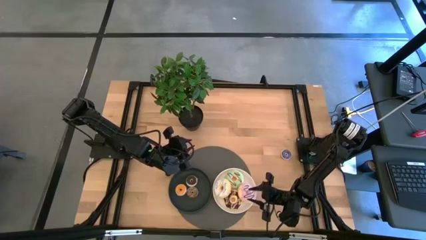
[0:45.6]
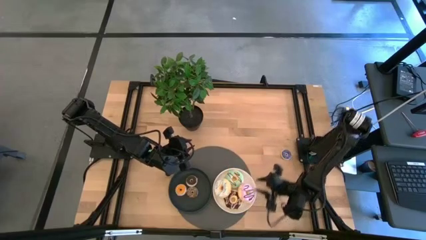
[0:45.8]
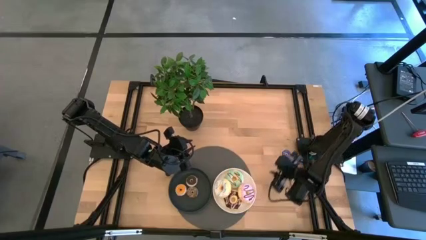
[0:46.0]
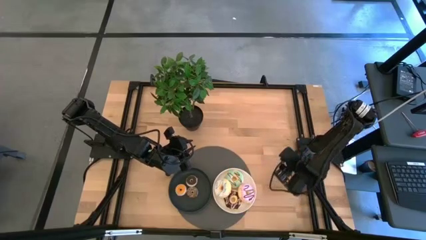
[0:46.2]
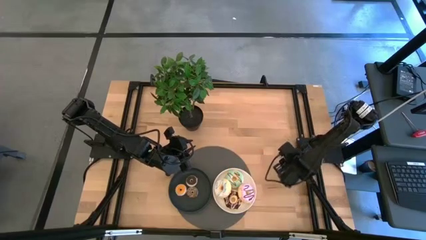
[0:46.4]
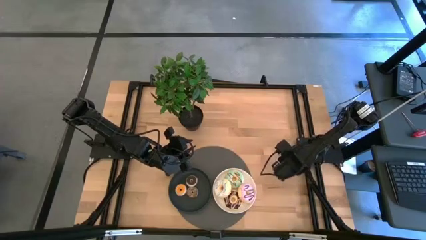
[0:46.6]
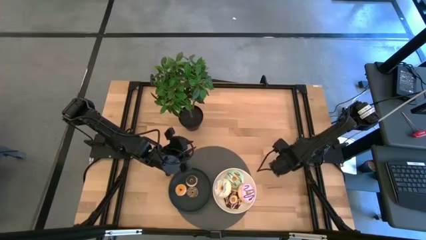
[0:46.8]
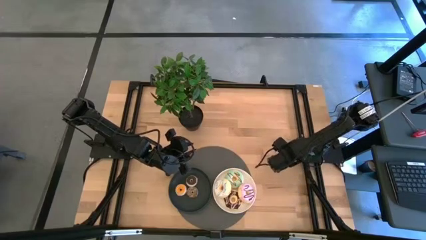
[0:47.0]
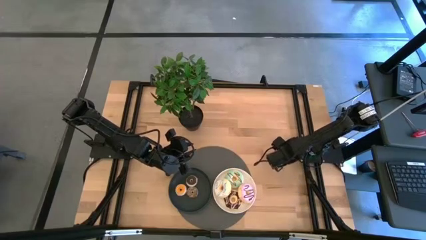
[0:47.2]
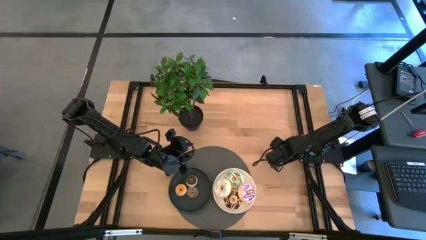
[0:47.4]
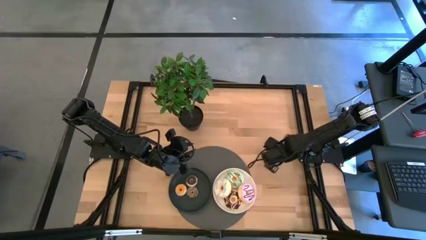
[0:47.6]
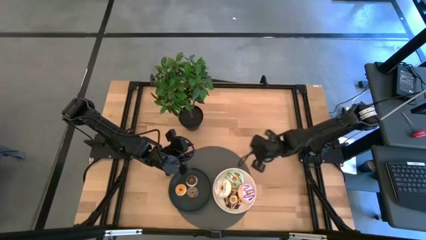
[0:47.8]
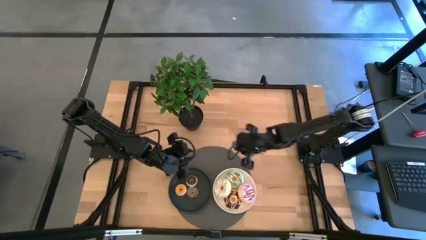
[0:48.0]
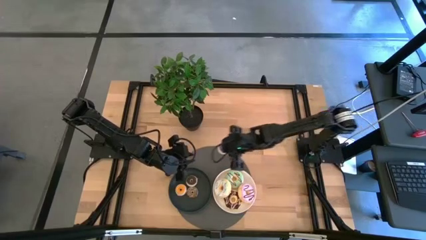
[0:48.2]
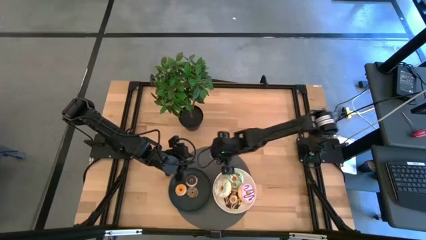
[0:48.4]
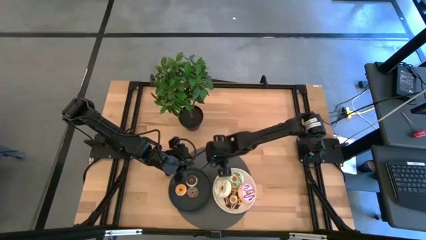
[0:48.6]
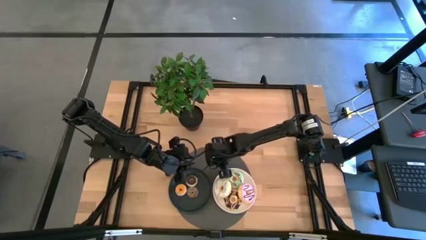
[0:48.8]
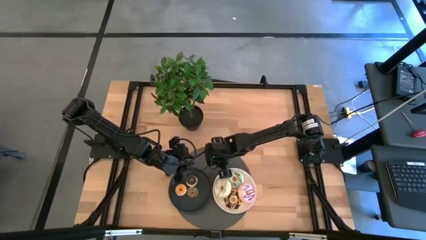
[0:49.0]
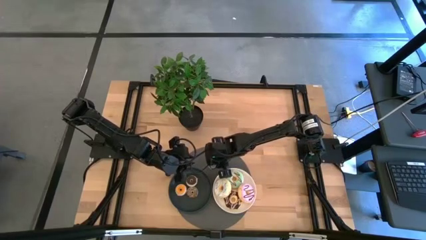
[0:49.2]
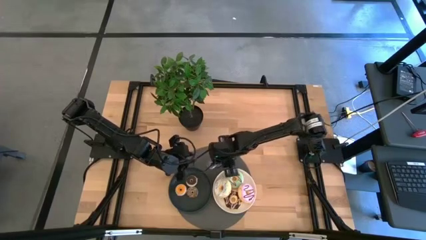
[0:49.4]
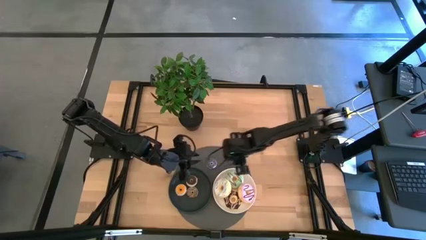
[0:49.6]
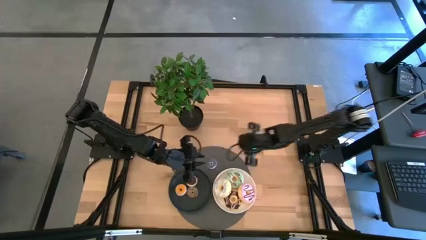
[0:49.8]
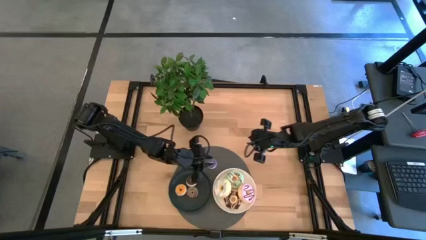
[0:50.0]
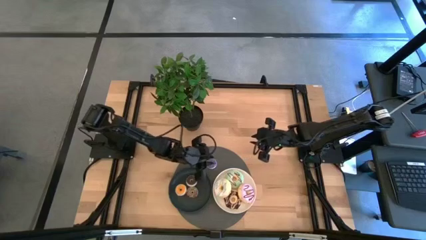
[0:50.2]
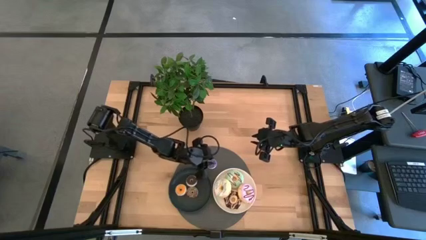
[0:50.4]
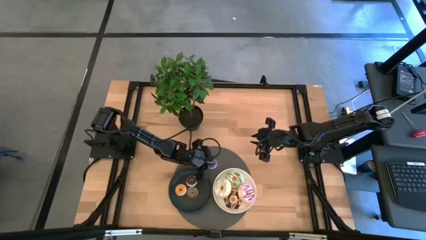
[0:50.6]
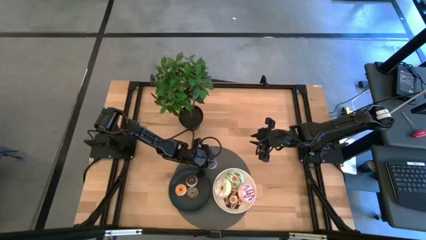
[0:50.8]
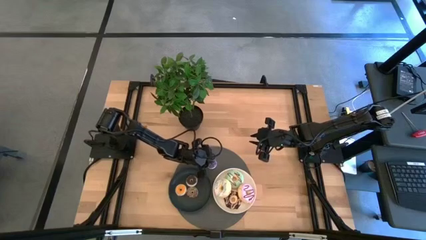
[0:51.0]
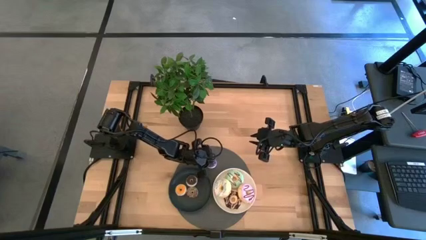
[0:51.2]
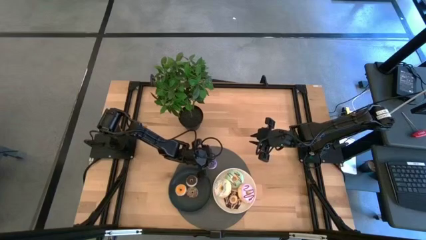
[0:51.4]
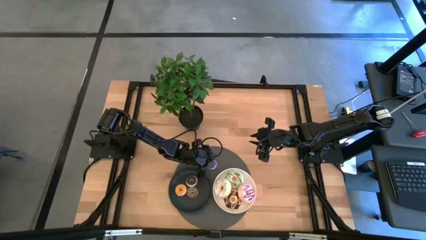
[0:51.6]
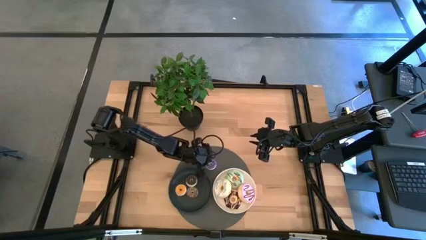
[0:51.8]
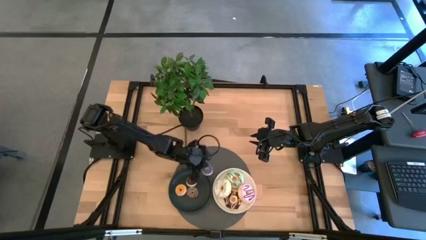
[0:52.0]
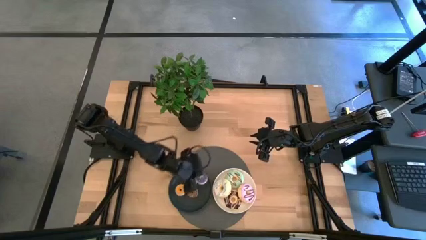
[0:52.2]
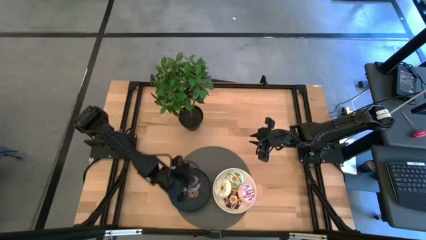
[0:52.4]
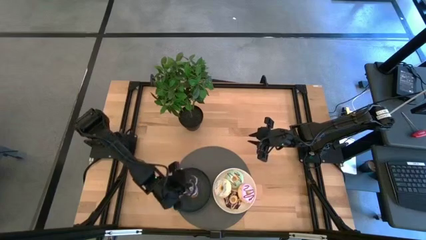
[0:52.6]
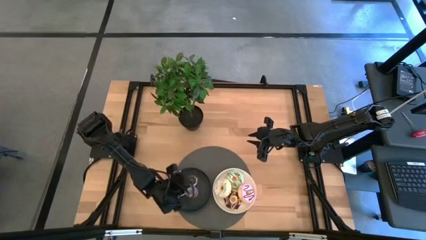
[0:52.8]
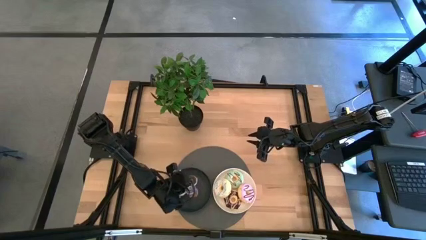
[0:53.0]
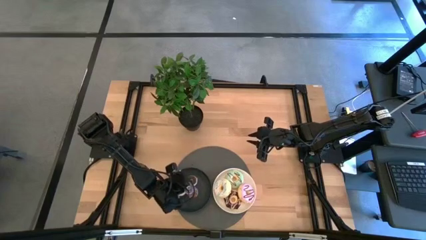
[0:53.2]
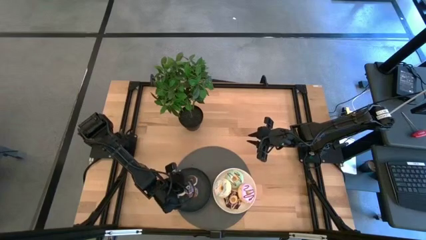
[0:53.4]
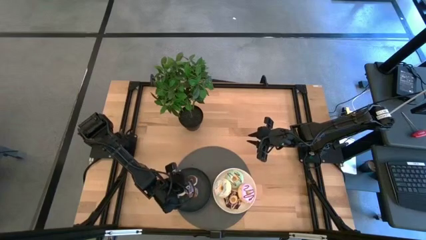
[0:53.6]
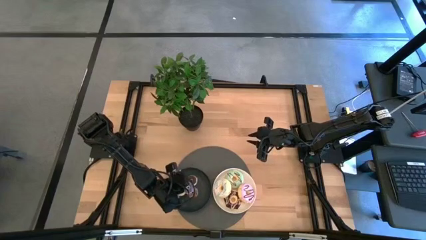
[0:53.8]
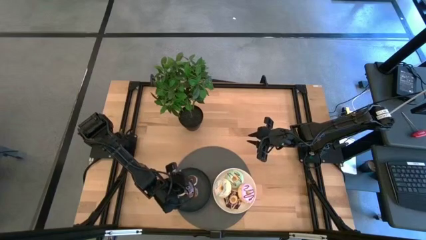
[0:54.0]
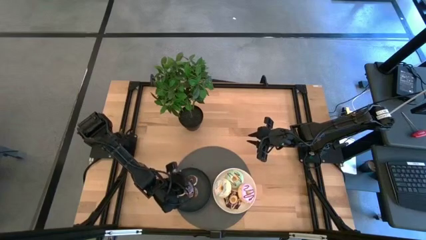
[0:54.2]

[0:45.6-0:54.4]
Task: Pick & Place donuts
Put the small blue sprinkled donut into the black plate

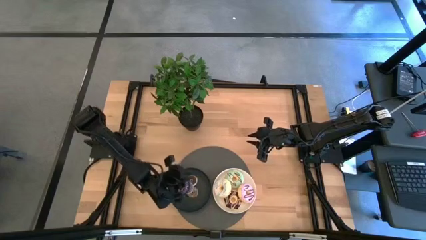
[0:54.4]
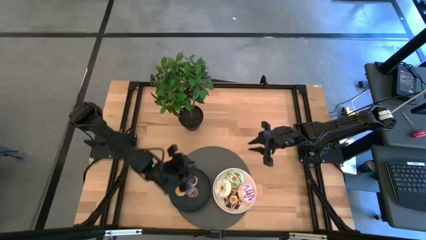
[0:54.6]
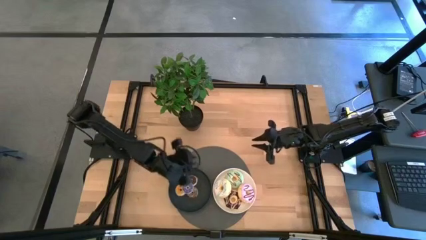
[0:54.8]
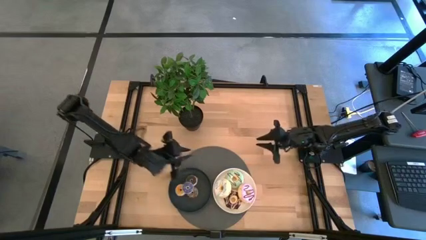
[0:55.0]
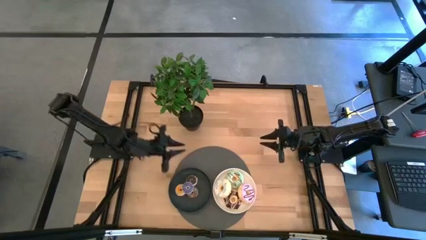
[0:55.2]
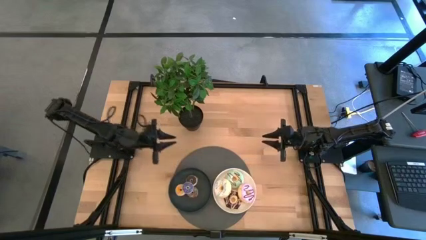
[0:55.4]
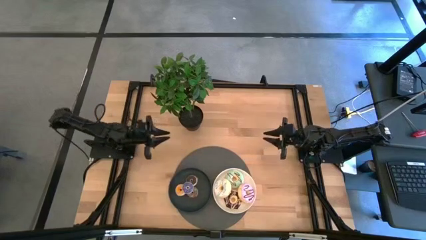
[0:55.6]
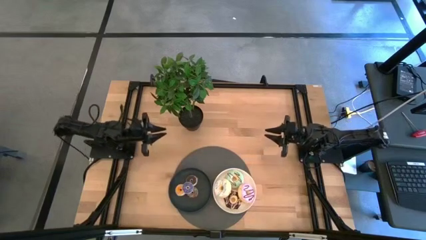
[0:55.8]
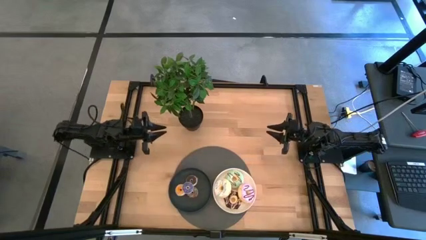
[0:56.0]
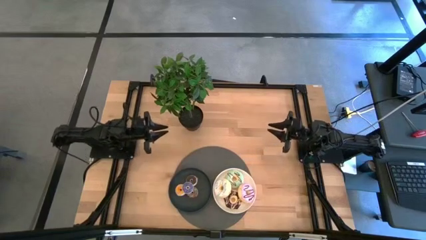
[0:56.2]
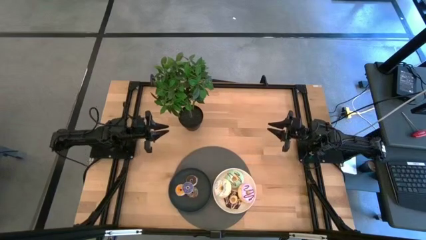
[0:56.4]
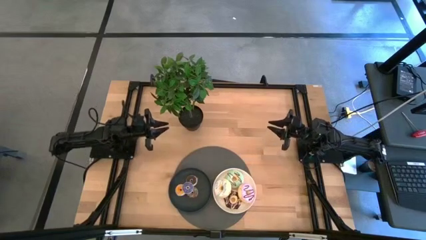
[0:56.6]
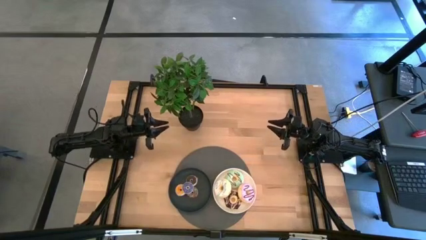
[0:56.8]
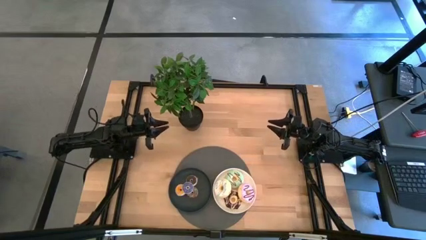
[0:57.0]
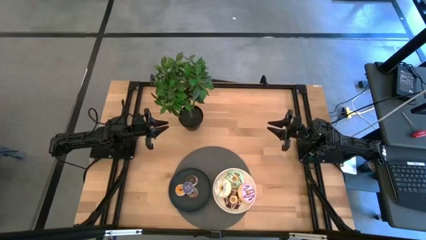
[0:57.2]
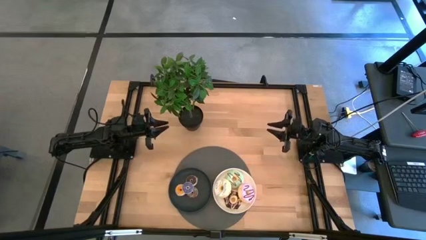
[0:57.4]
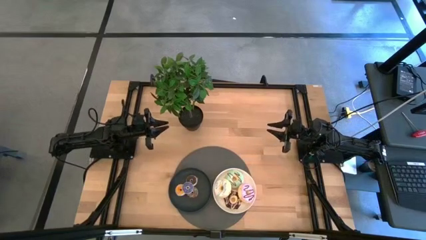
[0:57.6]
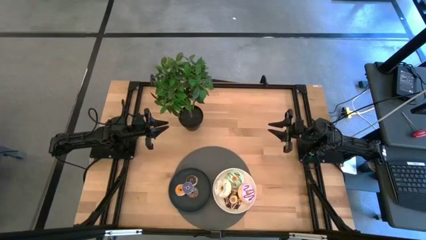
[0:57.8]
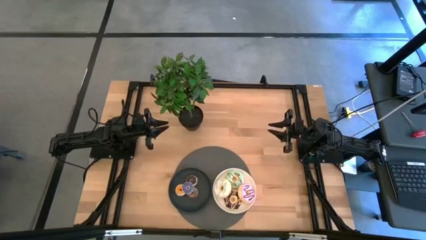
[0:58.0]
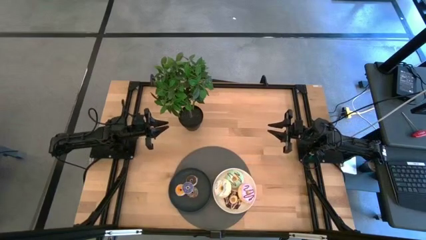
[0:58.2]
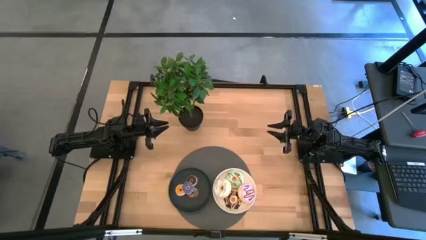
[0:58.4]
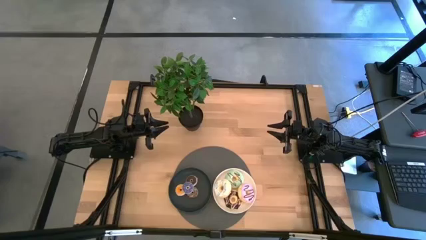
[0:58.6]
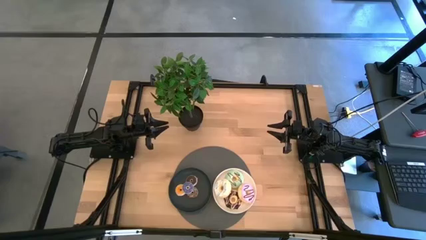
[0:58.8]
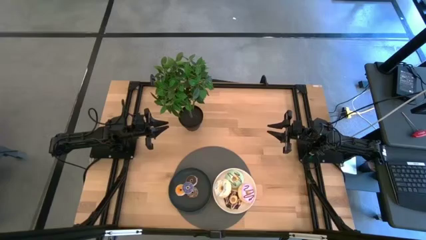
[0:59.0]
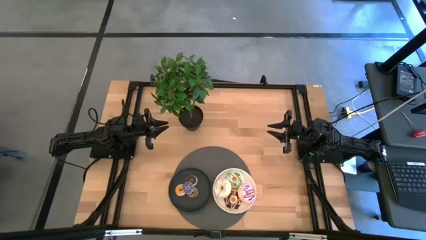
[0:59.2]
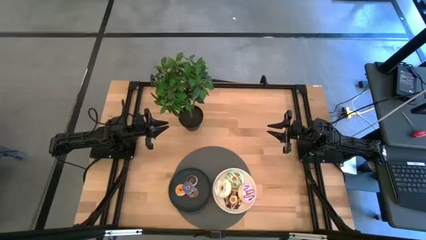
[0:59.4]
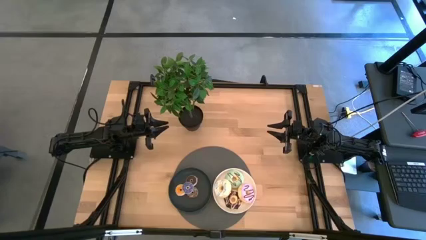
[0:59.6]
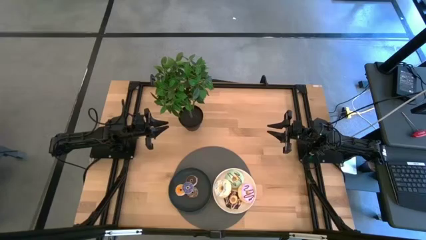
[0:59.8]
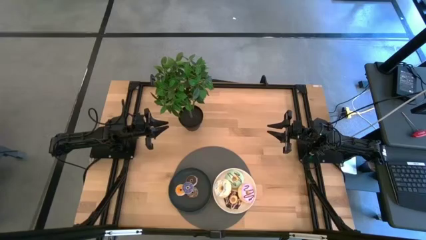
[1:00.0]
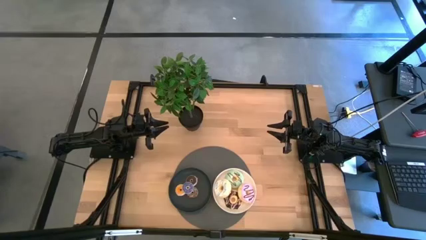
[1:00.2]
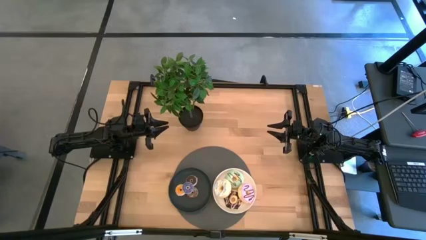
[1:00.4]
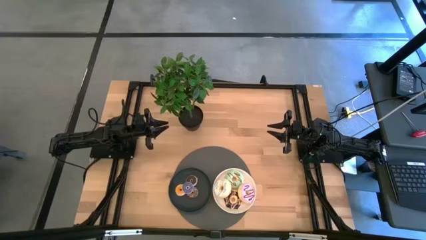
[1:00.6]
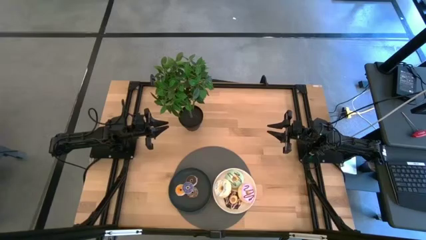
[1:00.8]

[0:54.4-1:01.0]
Return to Home Position

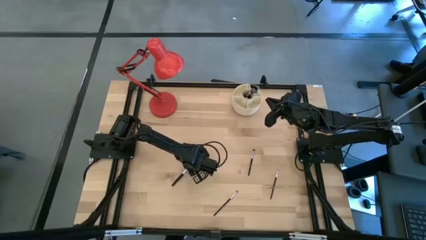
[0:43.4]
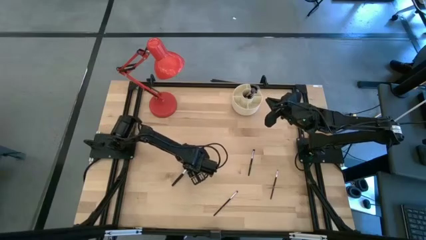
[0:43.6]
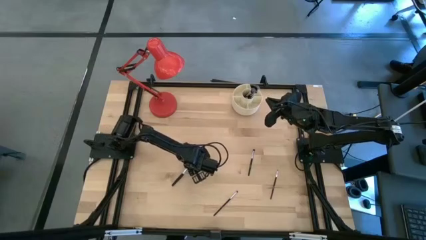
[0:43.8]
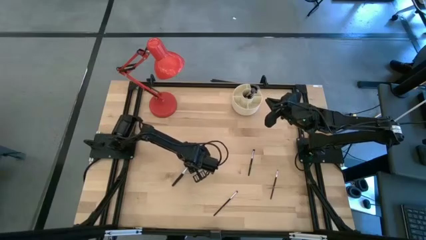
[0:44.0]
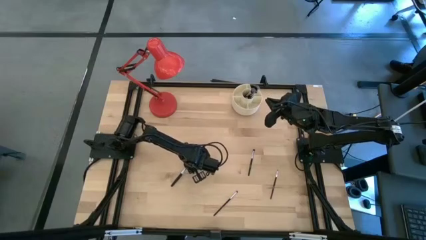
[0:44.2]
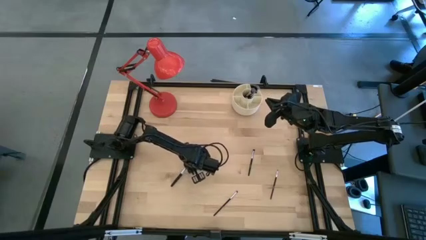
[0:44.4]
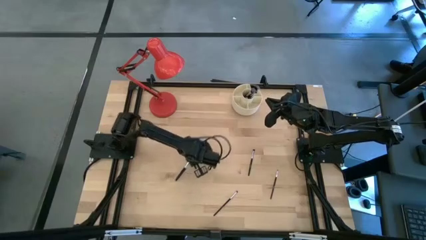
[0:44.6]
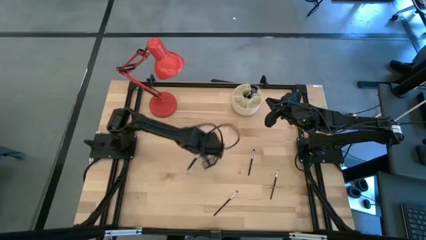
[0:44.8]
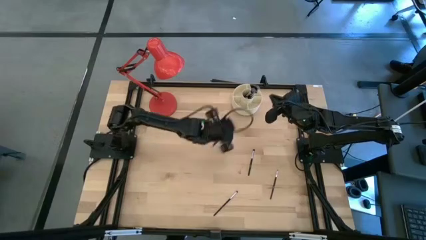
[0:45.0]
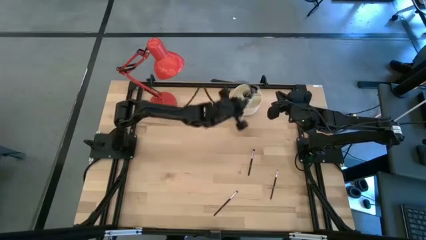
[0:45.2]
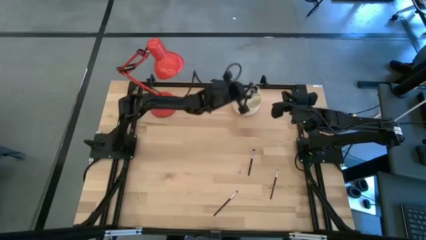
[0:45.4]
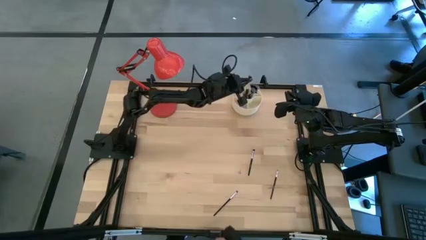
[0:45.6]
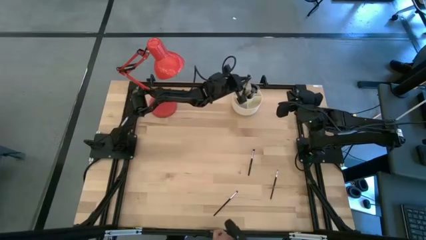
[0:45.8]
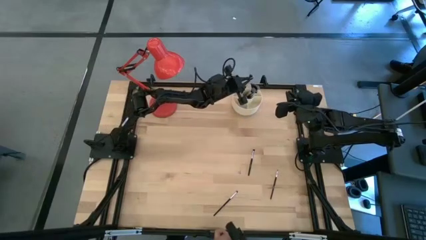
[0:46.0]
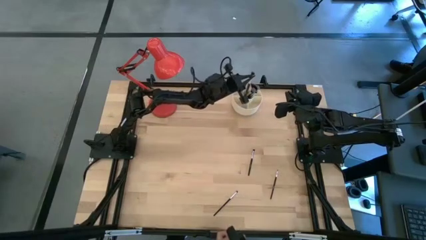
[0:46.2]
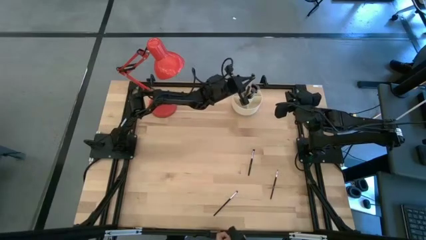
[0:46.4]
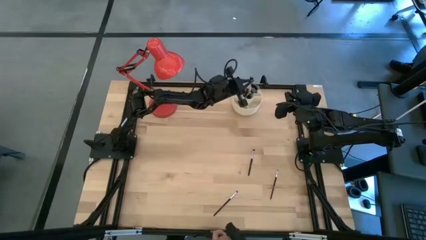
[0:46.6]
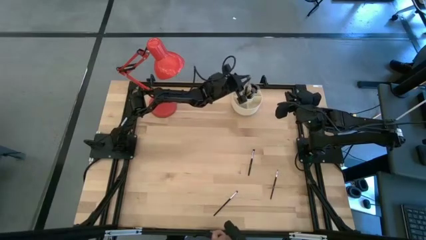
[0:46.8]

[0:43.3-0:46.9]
Task: Put items in baskets/containers
Put the black powder brush into the white organizer
